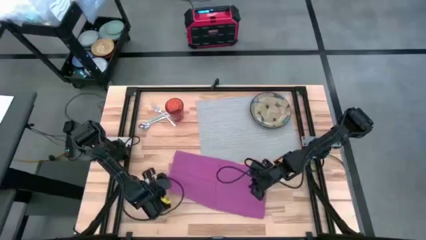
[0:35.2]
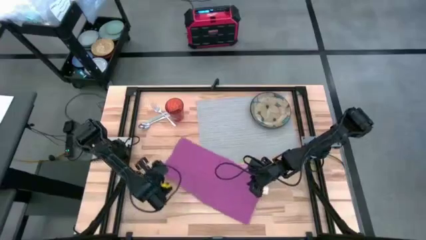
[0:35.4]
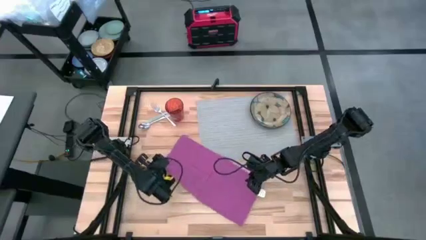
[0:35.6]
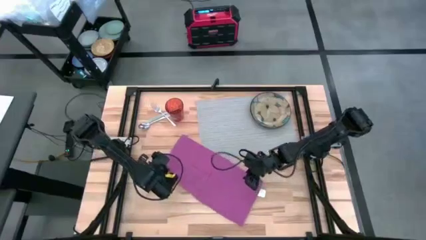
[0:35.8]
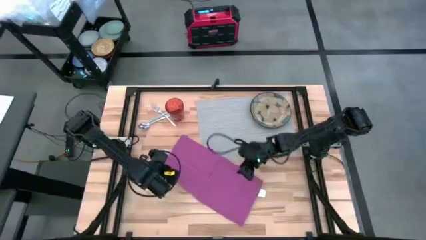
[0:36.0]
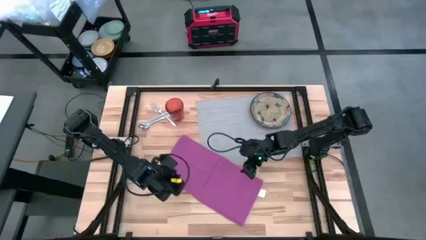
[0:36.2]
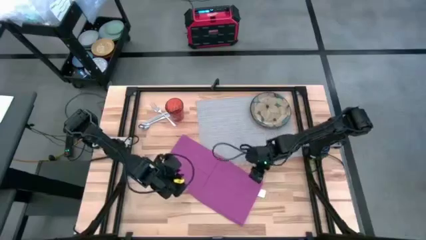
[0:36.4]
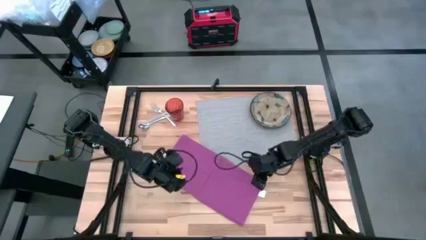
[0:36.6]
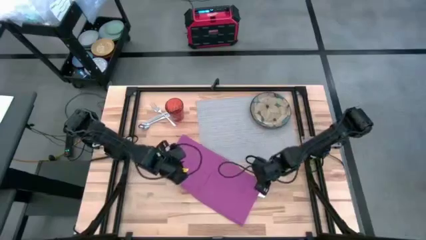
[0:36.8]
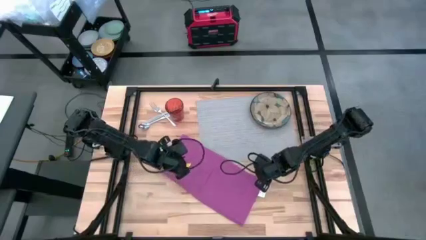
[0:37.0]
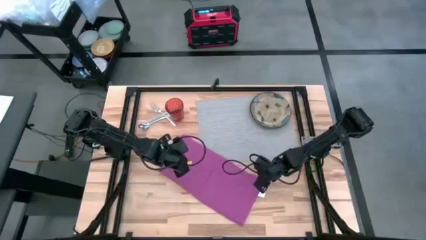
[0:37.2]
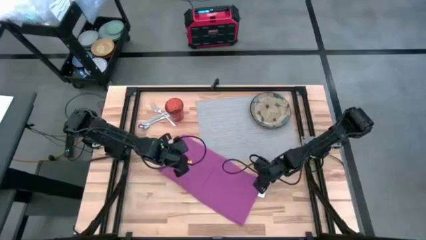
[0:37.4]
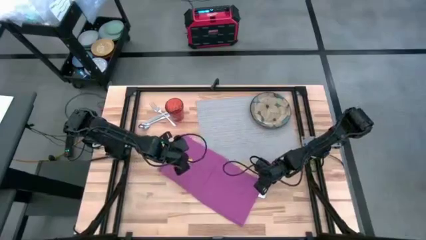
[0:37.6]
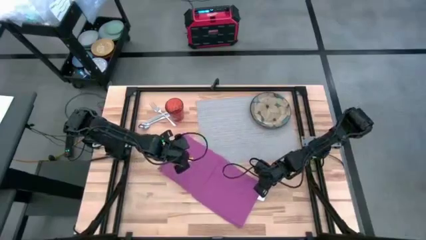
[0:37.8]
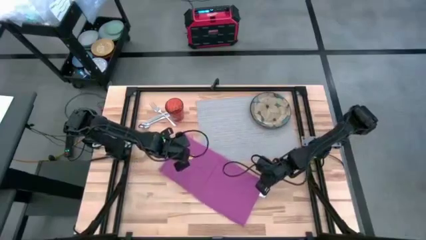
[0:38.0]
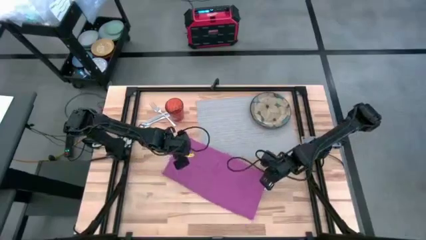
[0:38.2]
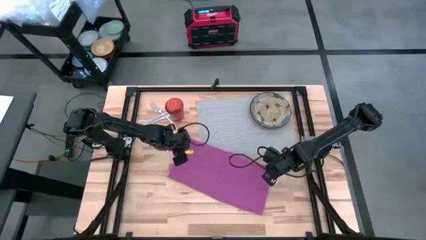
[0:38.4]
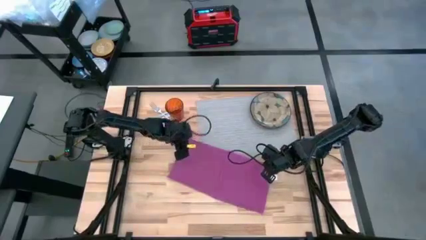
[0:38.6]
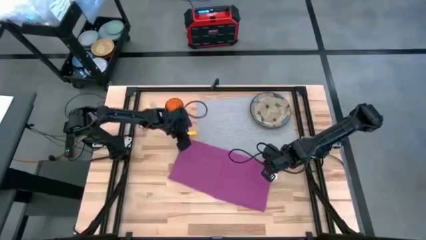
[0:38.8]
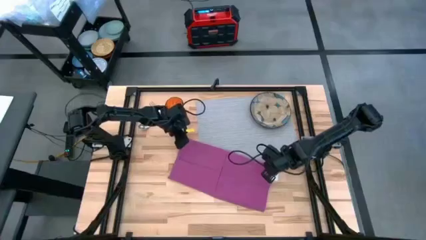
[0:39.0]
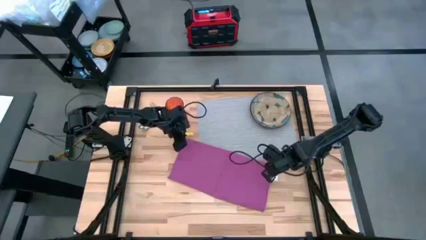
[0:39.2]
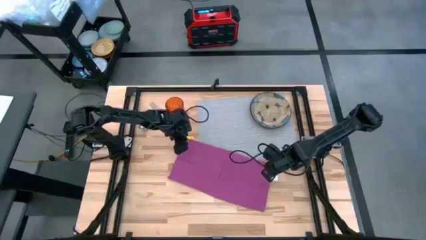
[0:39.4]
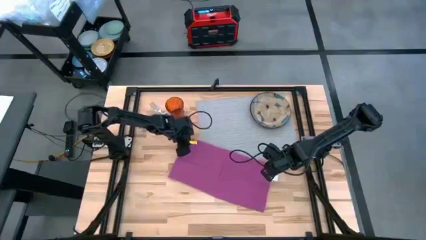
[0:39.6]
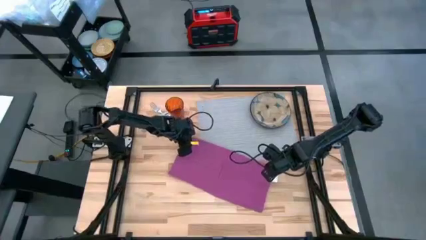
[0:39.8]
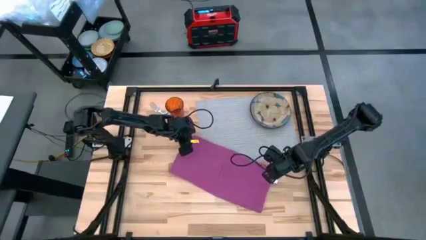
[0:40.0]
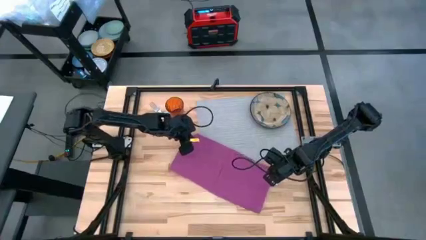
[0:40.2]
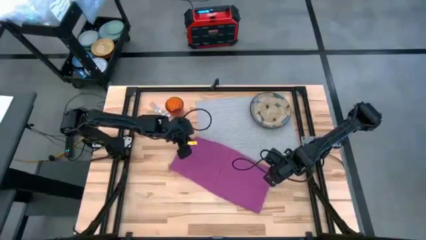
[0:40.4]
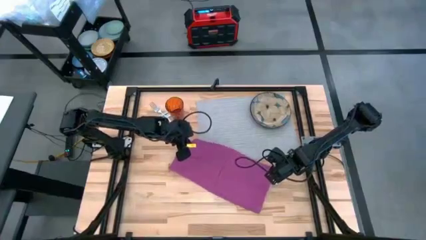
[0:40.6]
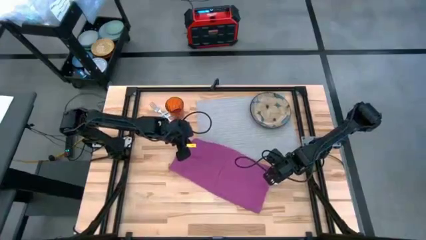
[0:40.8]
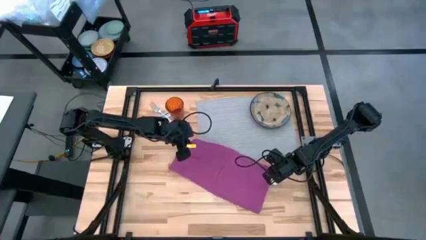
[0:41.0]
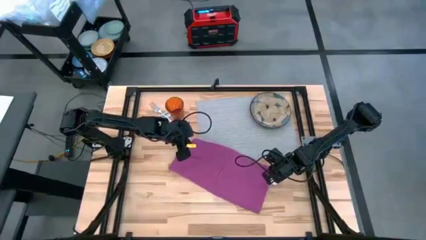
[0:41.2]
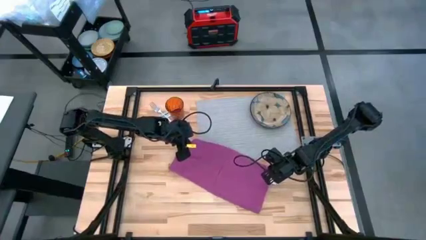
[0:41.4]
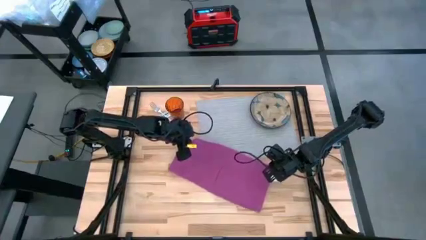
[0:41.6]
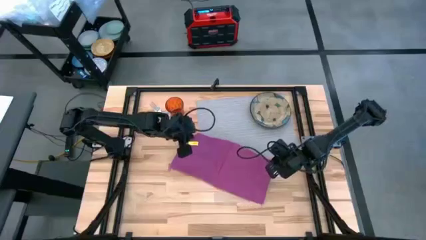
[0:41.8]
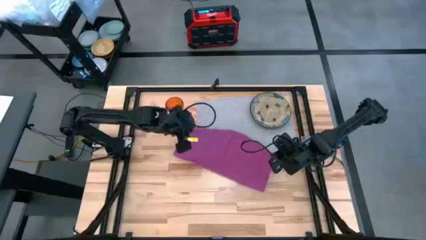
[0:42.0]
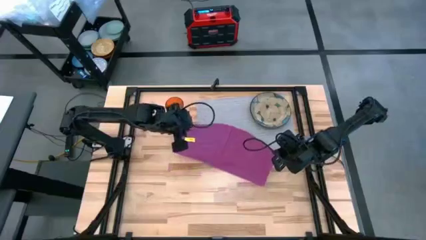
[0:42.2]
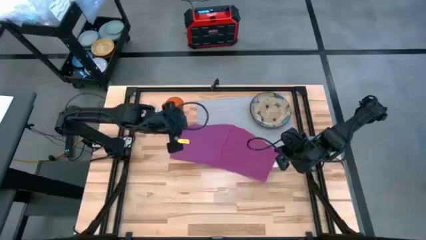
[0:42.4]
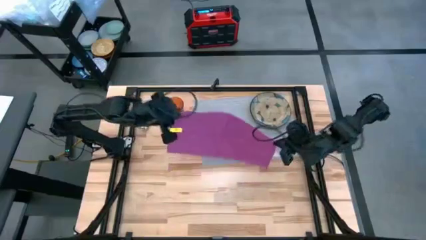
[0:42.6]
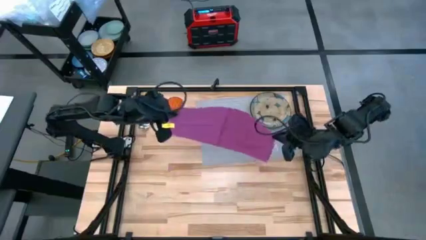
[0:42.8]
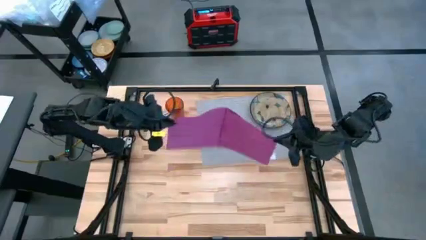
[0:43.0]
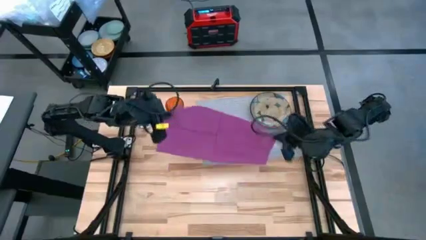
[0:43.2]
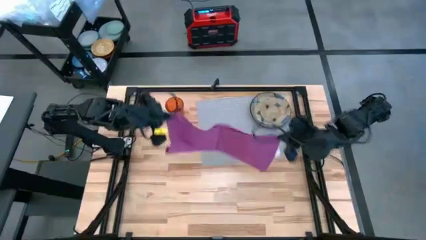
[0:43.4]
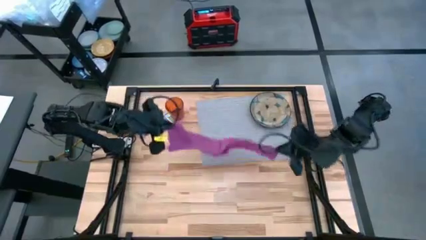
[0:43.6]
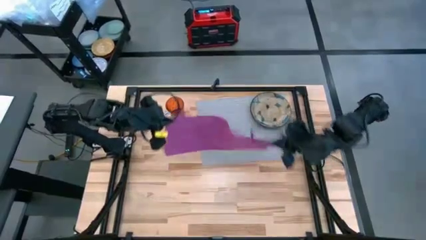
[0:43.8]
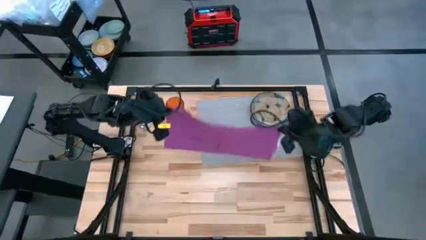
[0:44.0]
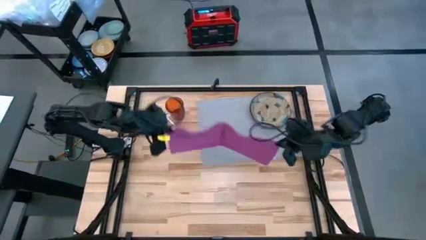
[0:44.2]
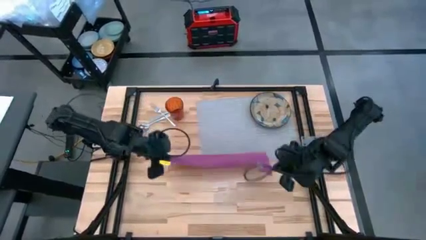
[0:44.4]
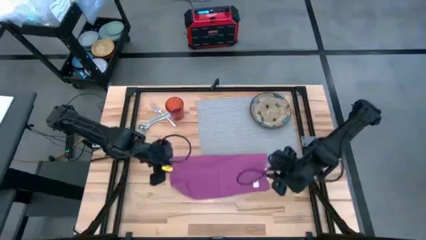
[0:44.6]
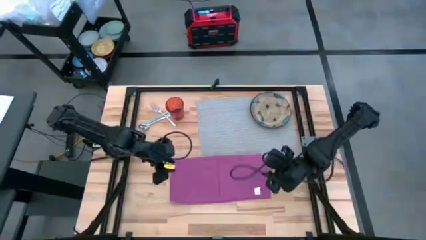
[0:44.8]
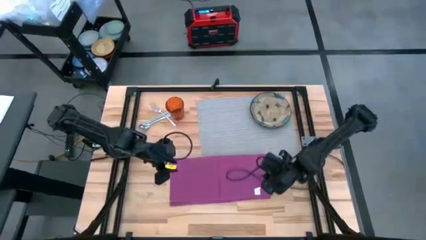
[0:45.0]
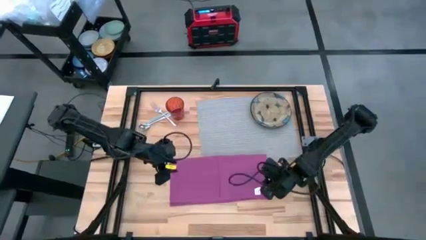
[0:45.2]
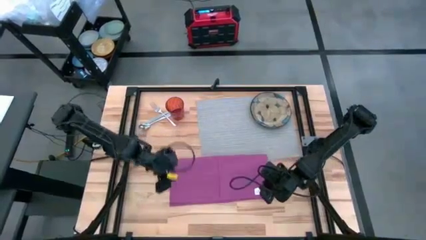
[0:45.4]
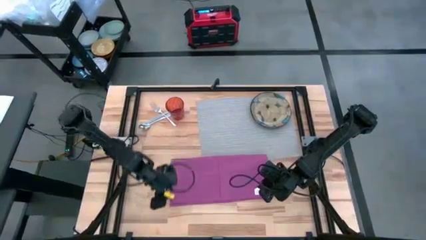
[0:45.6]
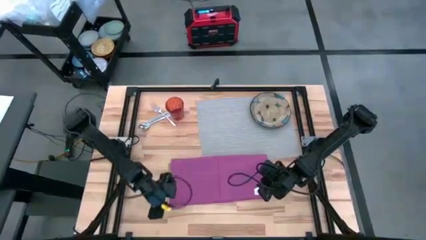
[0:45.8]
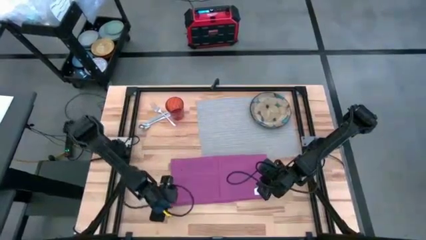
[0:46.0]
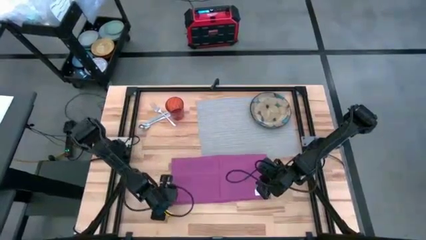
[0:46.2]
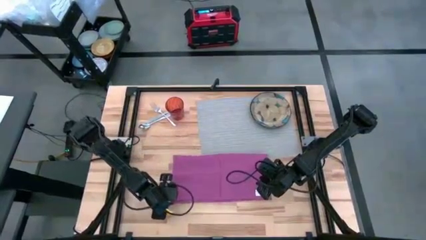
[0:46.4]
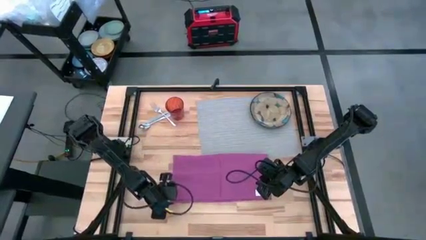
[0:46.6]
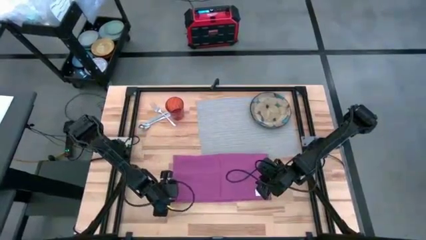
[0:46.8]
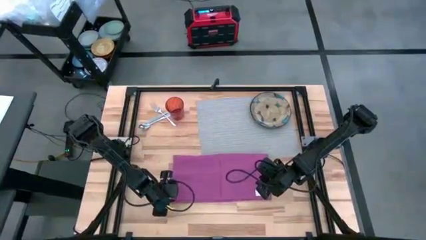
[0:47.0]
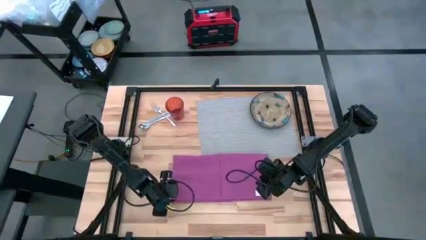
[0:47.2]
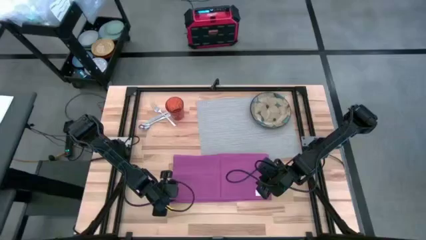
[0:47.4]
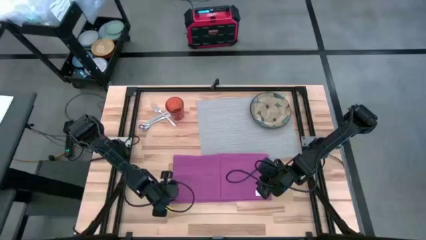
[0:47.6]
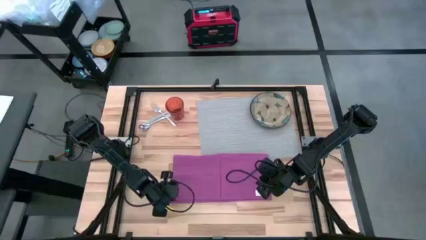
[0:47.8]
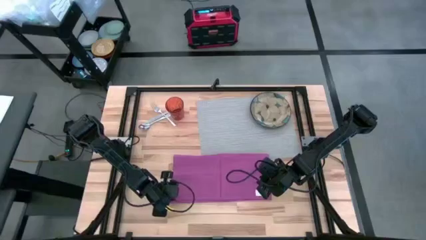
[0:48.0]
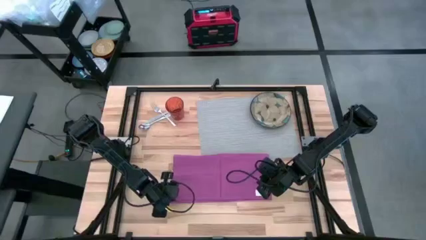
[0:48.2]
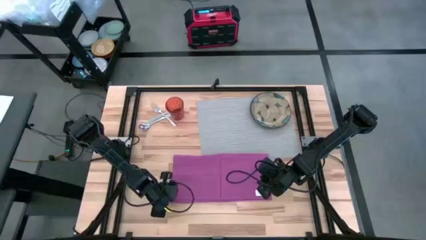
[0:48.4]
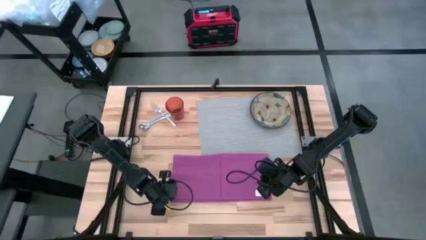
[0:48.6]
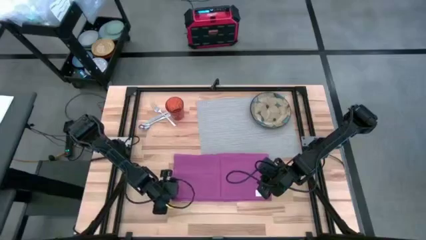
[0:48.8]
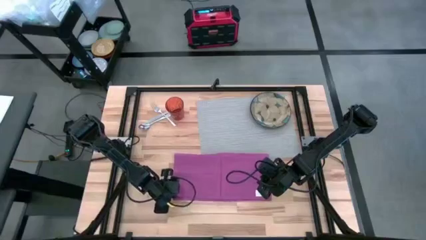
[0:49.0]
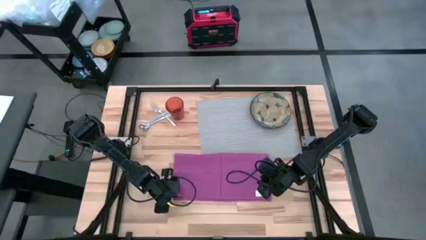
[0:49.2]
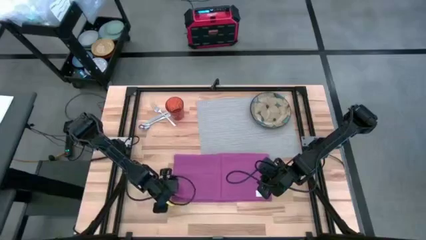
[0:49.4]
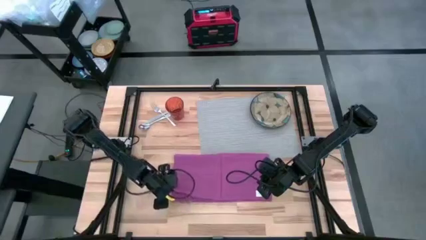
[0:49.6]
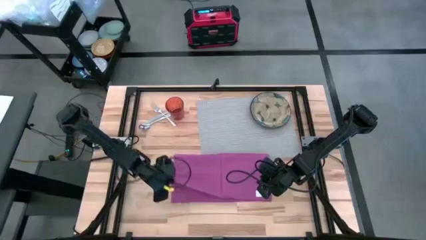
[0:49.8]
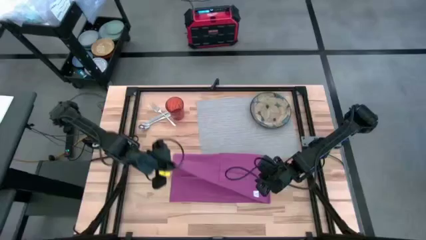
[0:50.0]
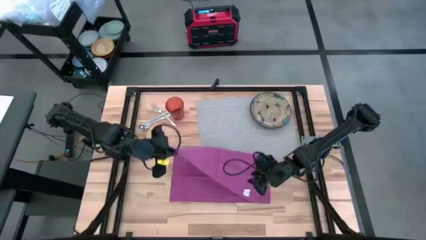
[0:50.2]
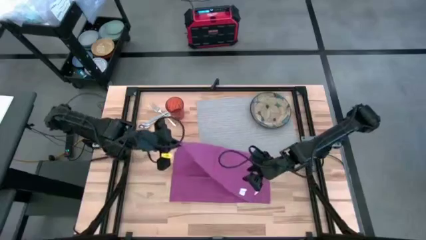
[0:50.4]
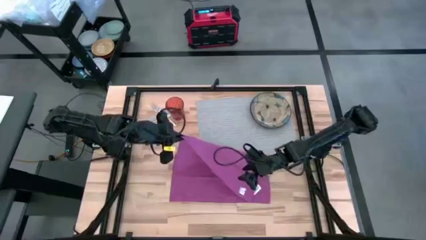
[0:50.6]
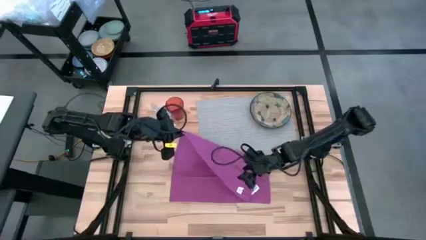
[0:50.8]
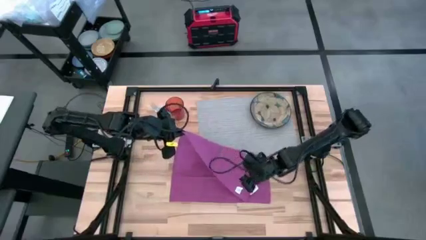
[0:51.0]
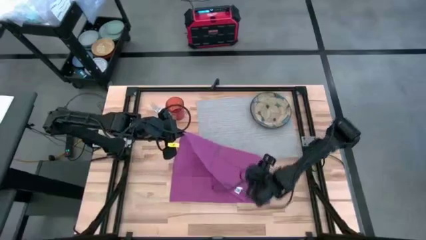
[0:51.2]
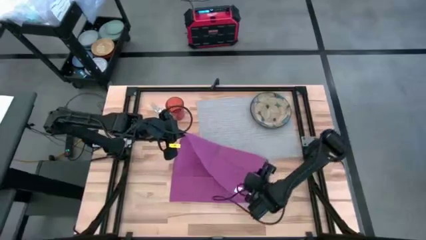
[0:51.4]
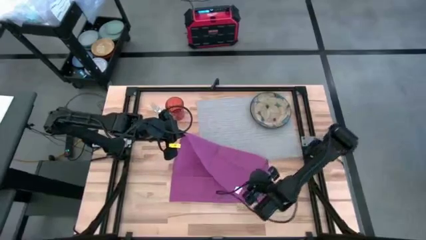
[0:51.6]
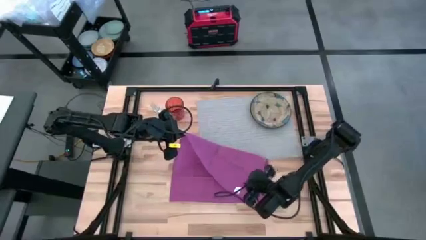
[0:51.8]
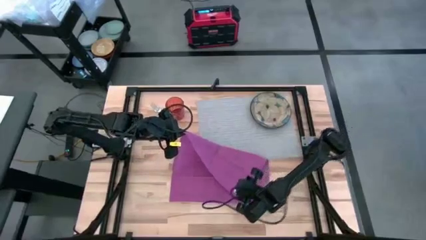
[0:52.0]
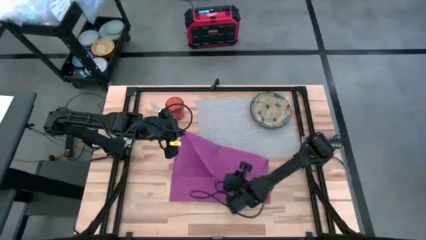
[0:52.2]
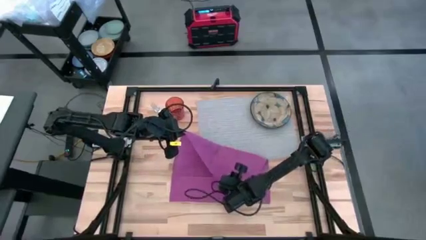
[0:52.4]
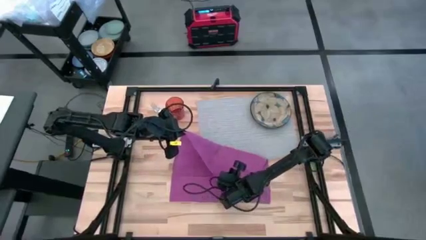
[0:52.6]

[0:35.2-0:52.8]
Task: Set table place
Fold the purple napkin

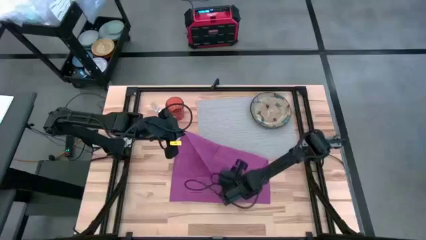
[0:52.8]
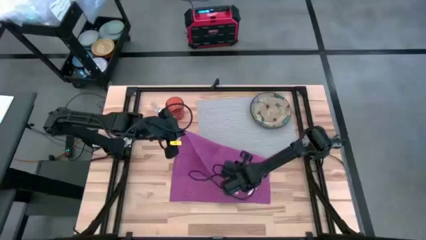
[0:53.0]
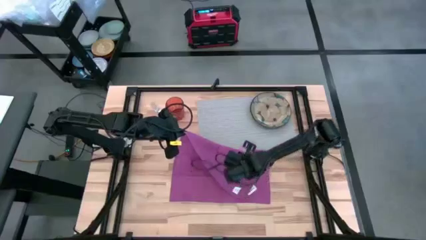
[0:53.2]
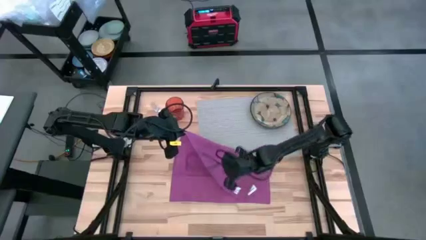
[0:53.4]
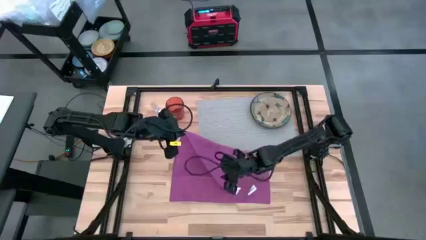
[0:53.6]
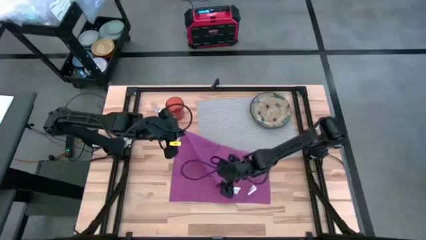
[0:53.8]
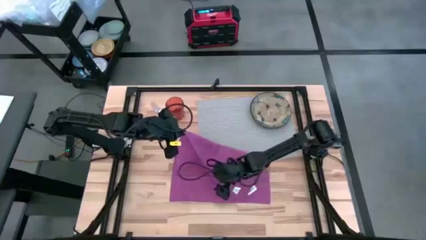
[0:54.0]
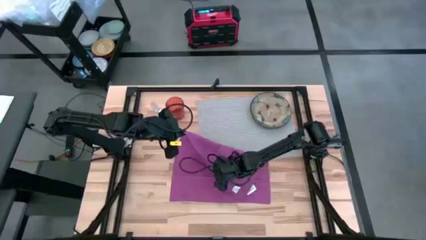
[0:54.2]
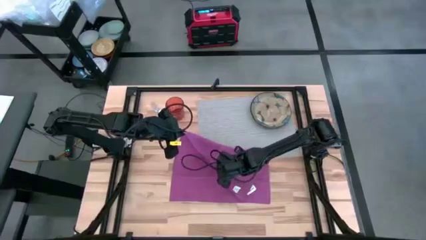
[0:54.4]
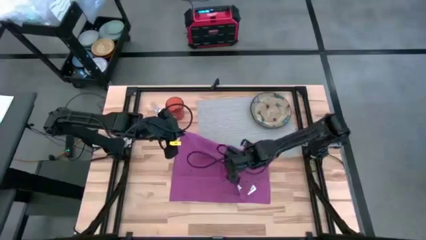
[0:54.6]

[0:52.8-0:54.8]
Fold the purple napkin
